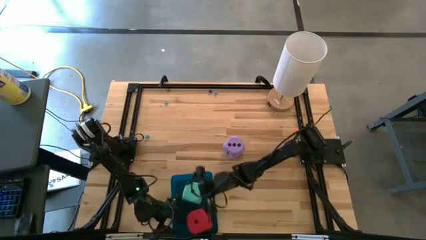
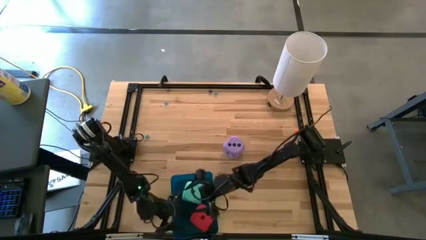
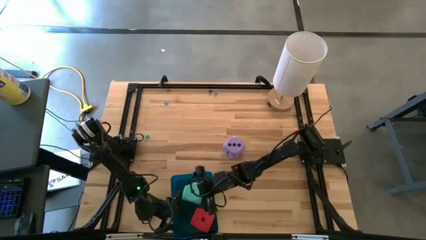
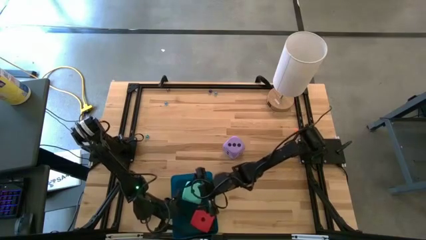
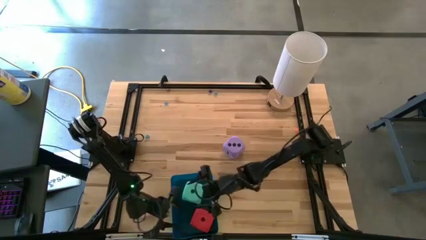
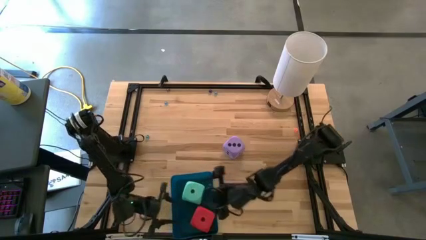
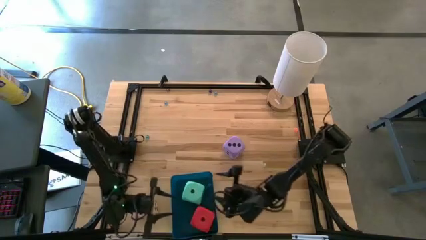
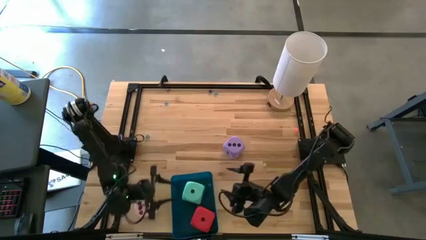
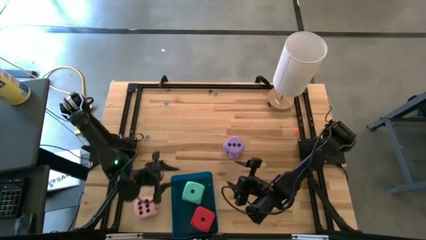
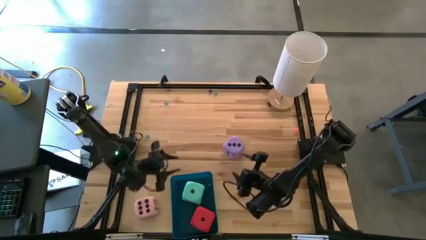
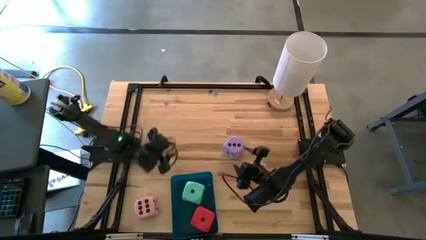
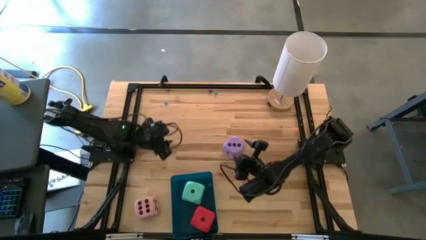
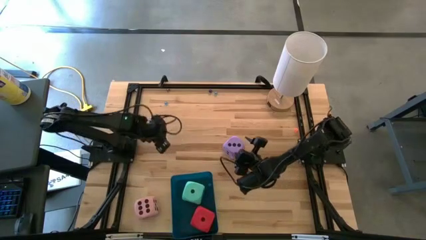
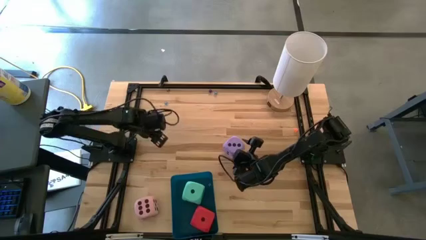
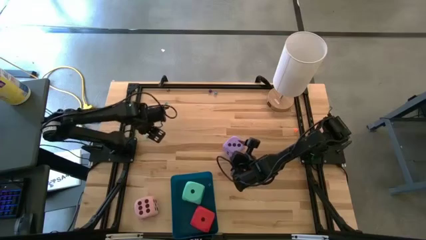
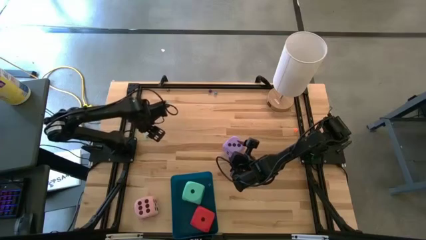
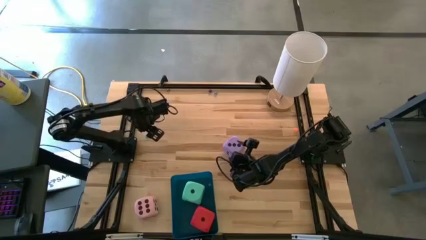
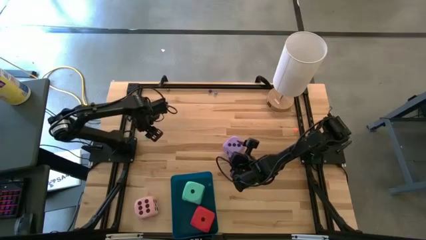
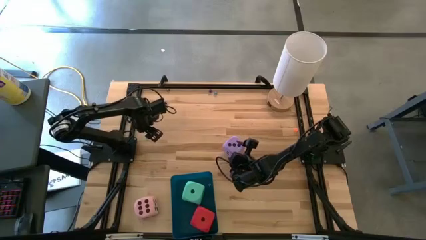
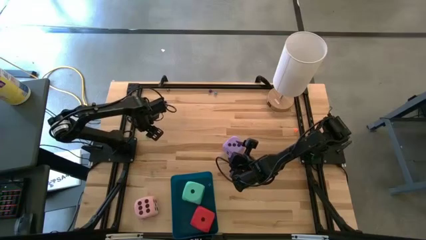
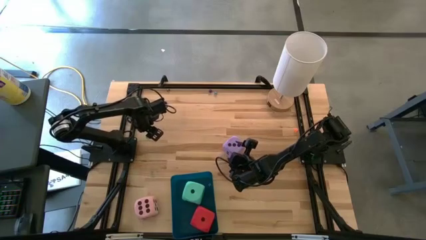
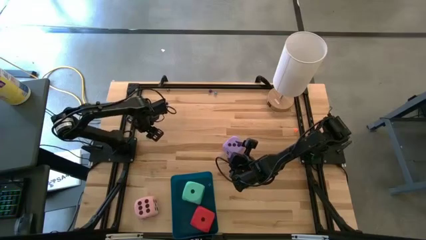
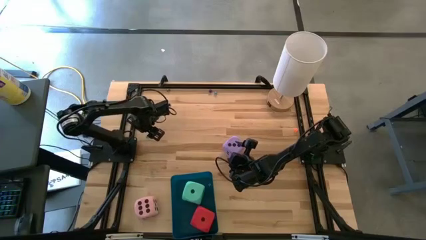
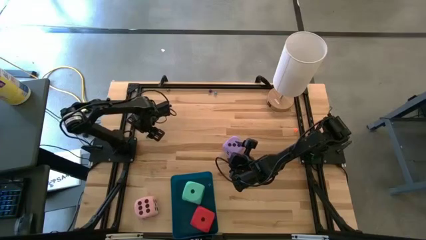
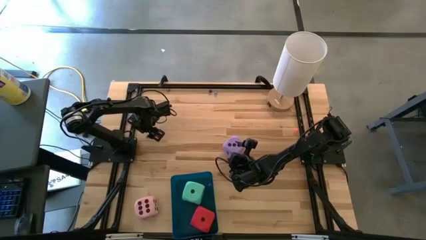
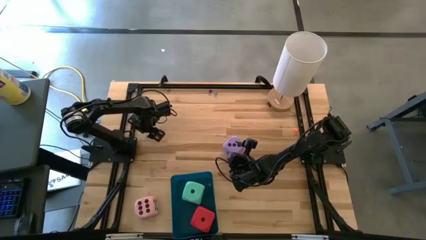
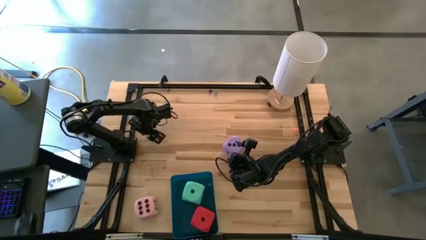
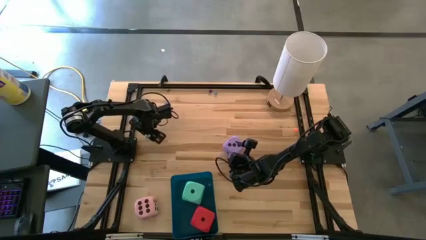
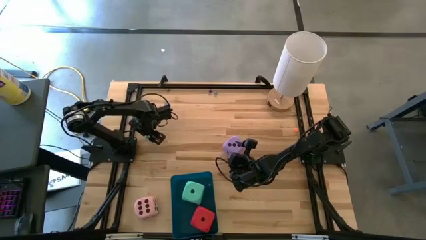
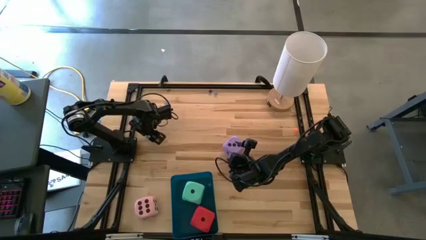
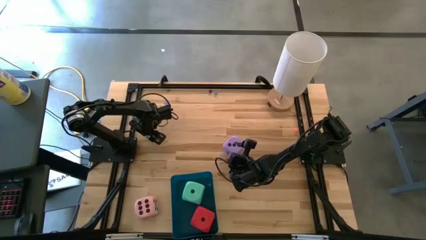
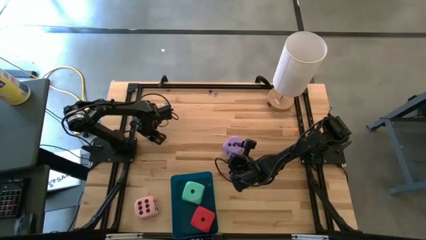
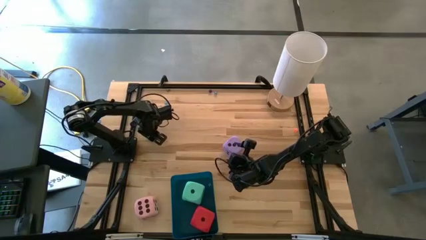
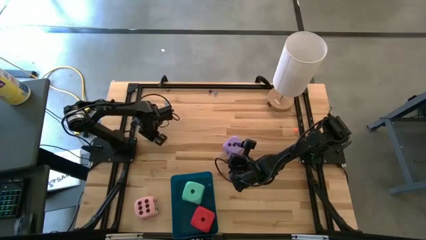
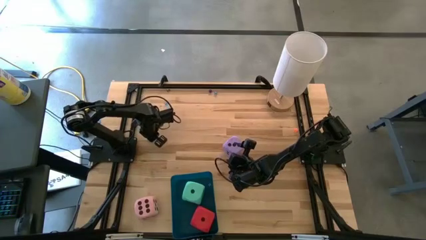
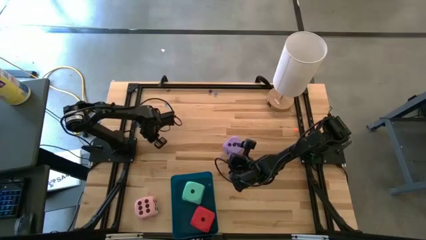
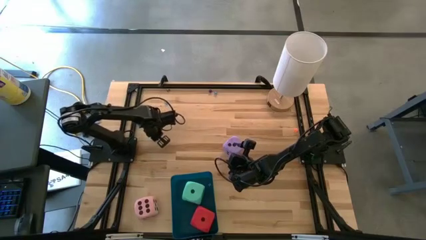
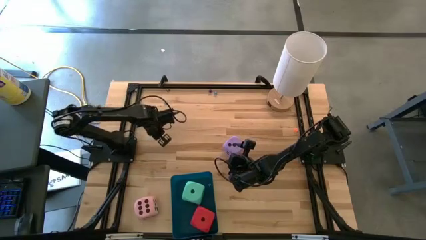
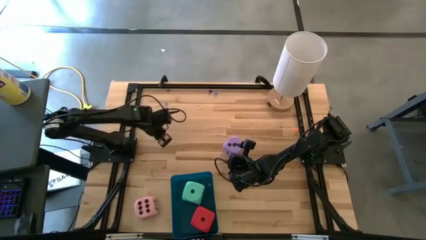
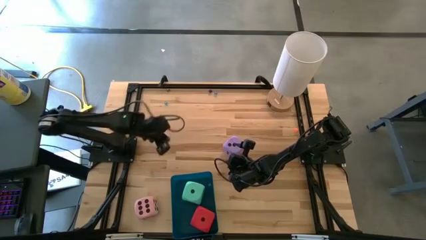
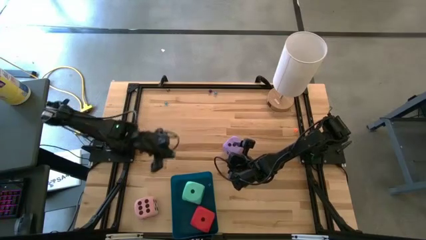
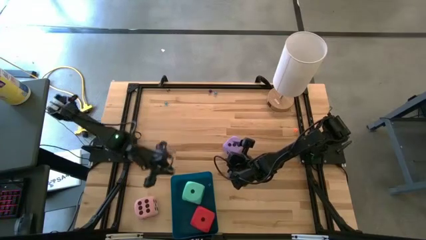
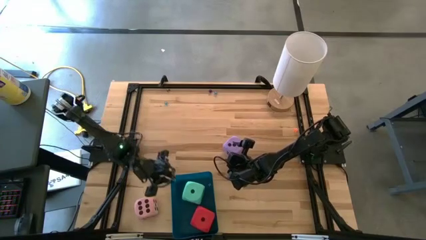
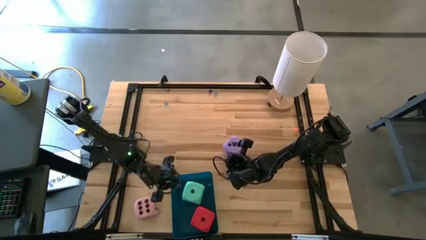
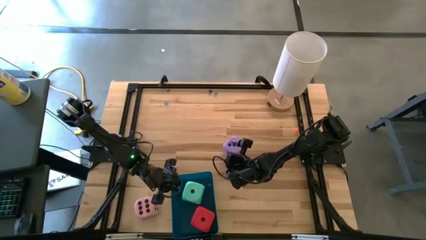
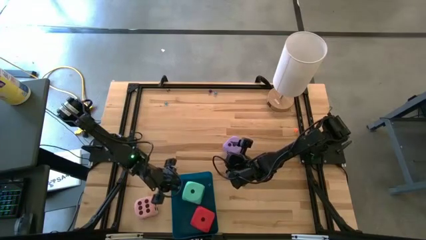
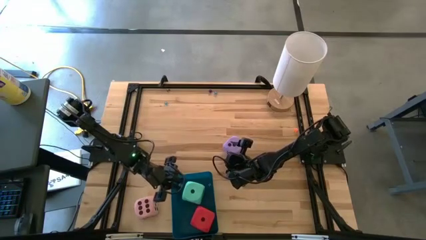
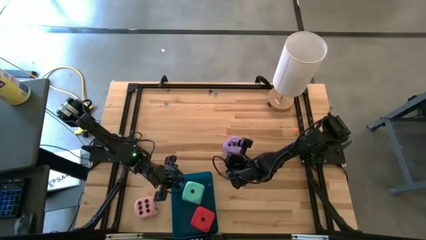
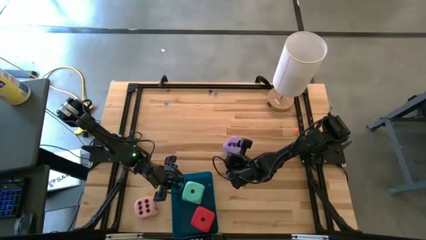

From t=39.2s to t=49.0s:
Task: Pick & Place Dice
Put the small light blue die into the blue bin
